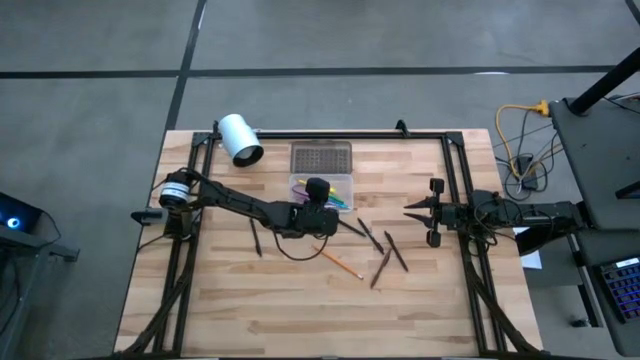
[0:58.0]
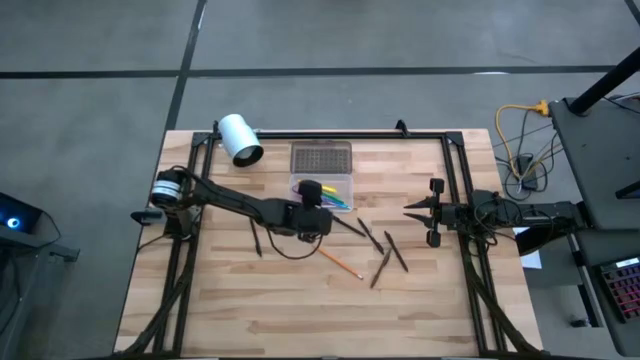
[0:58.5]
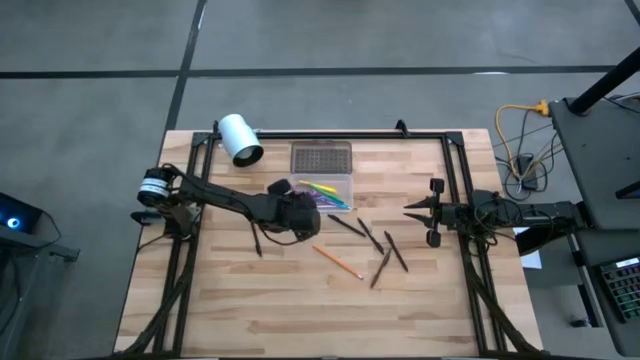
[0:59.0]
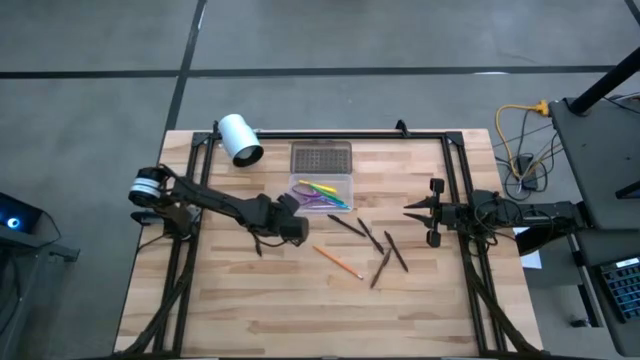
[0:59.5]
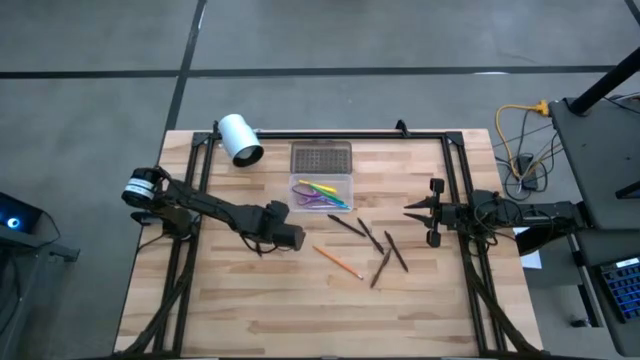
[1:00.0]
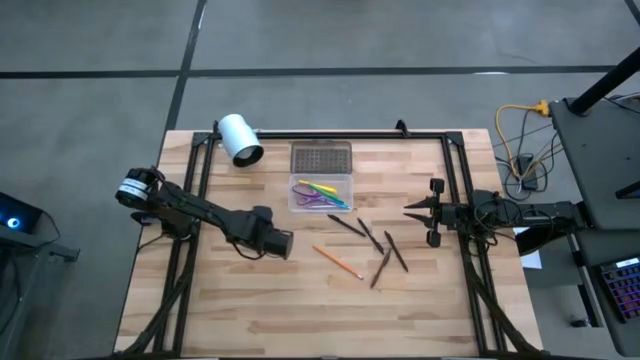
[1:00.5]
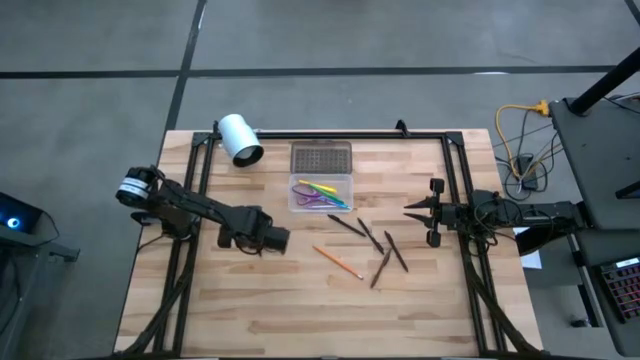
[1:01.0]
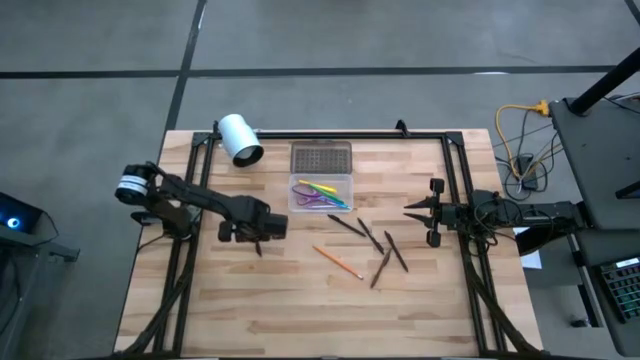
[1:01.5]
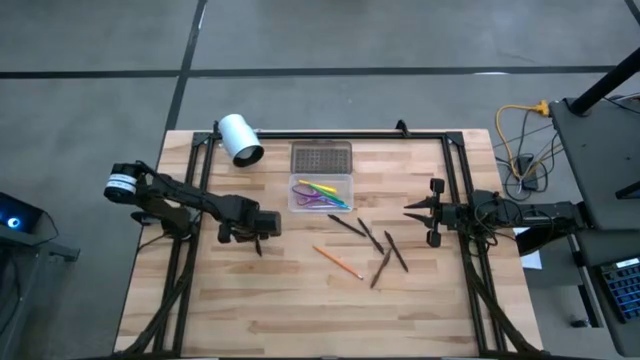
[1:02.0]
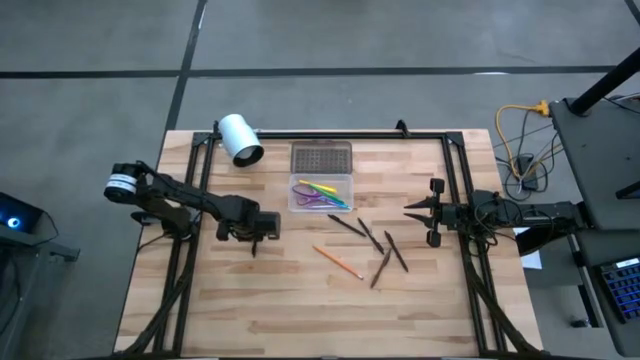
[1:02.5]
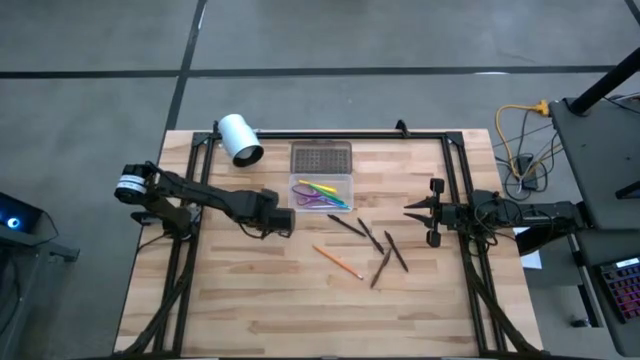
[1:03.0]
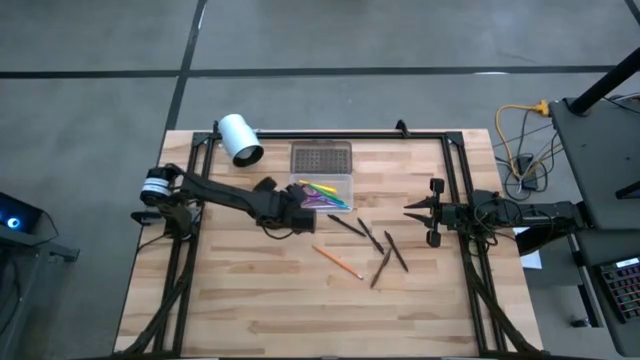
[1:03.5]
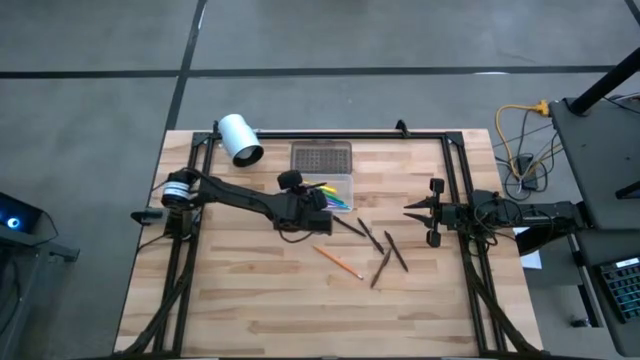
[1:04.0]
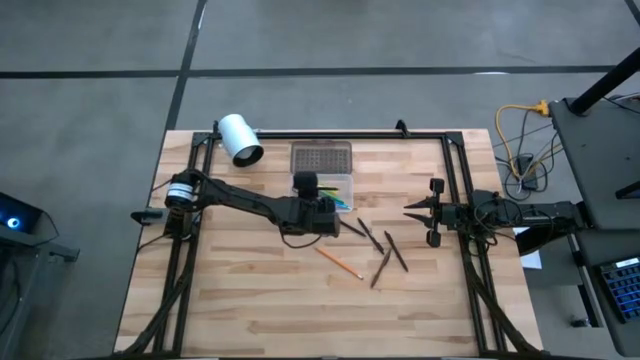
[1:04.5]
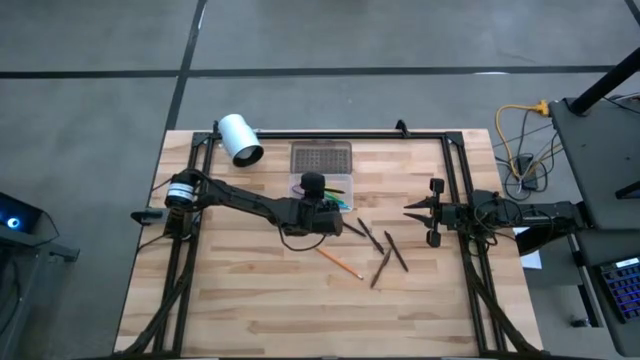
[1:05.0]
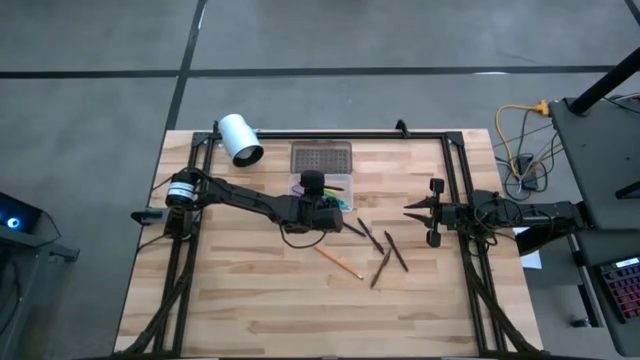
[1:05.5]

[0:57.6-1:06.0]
Task: Pick & place school supplies into a supply box
Put the black pen into the supply box

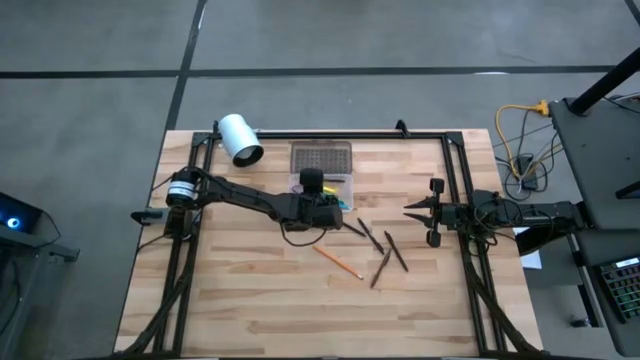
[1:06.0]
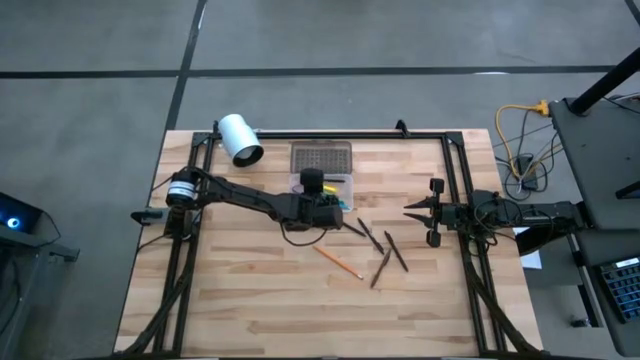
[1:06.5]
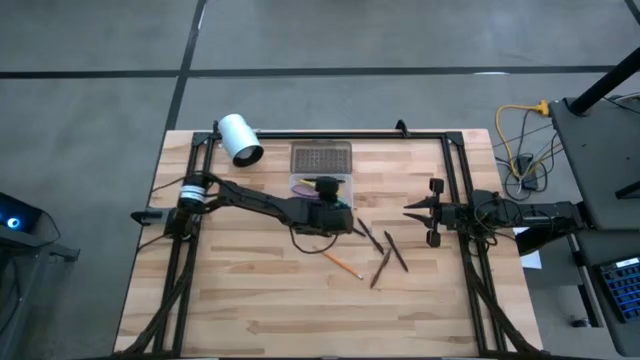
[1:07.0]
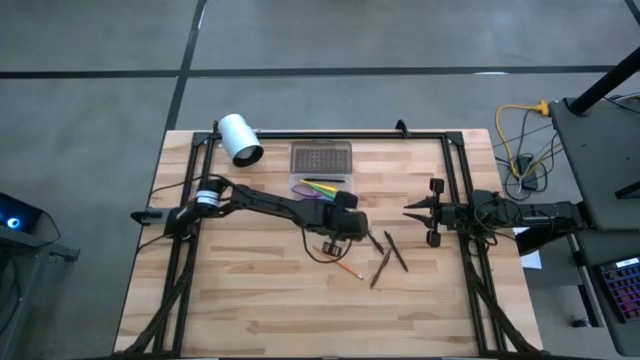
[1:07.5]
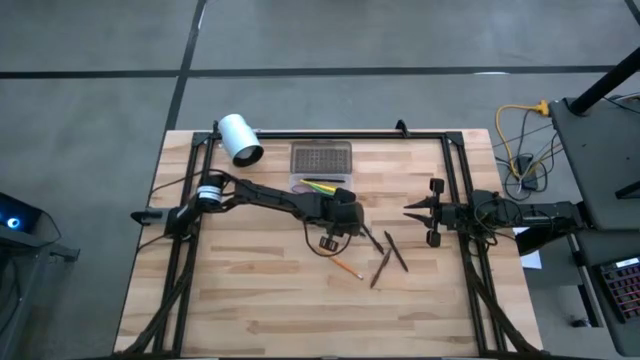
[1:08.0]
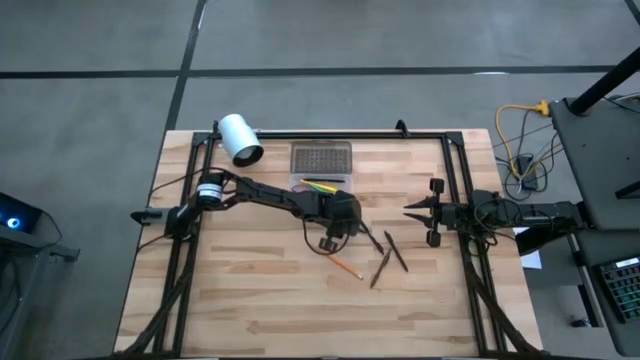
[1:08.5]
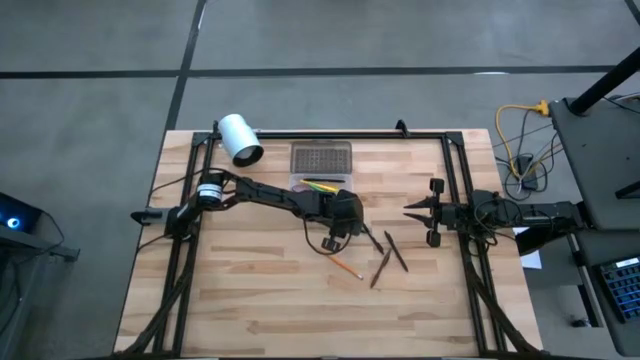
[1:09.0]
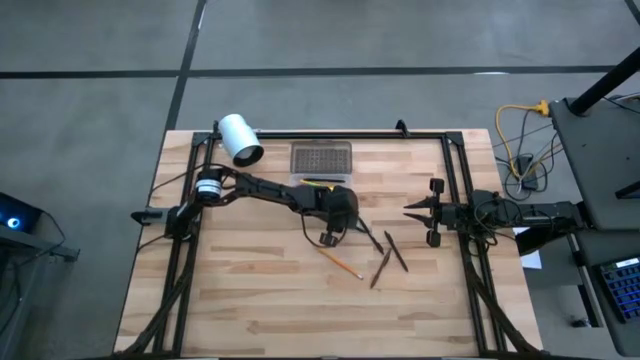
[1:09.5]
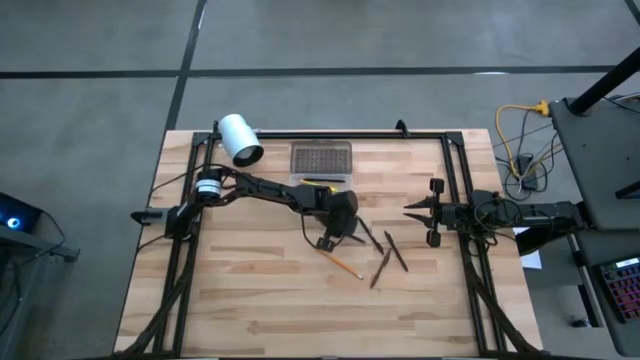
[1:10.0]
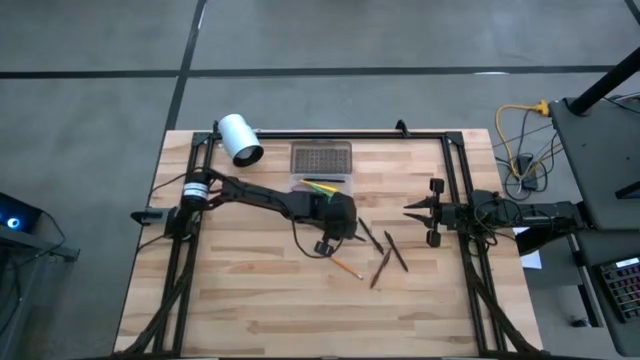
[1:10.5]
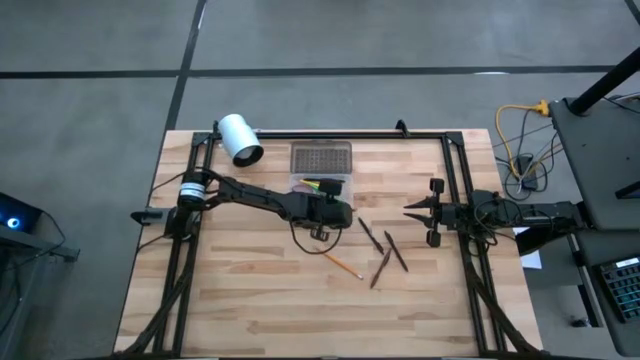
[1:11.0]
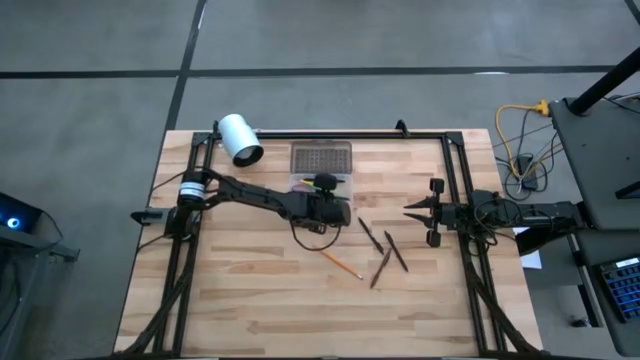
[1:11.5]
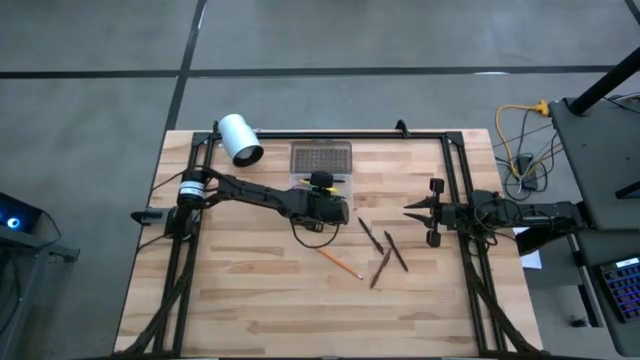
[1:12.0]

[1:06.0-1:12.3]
Put the black pen into the supply box

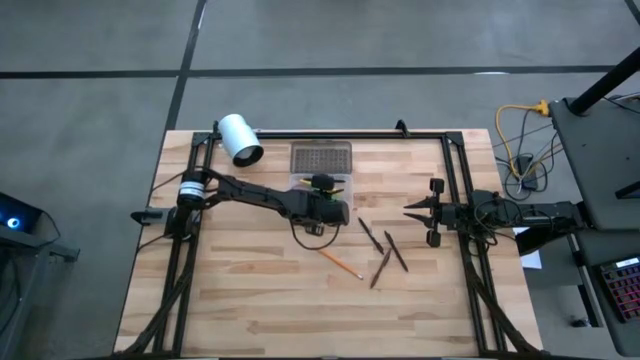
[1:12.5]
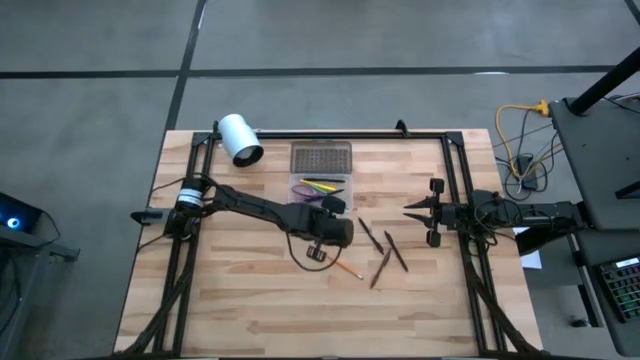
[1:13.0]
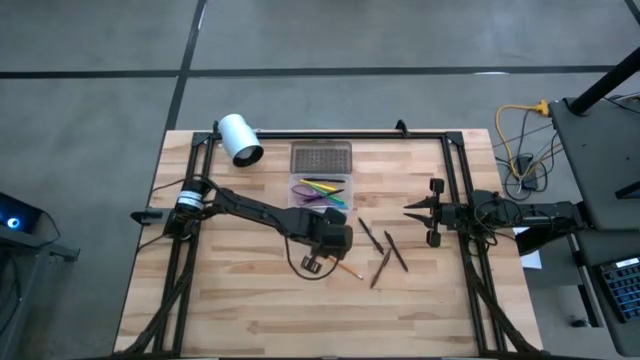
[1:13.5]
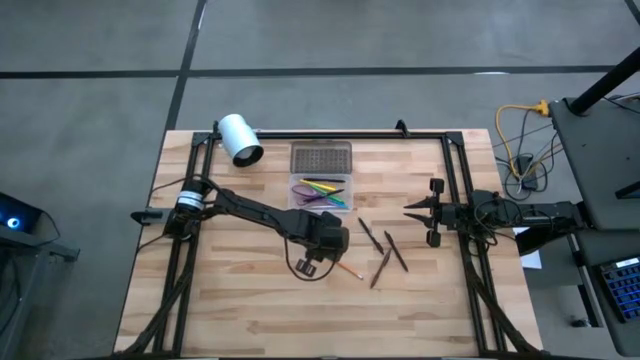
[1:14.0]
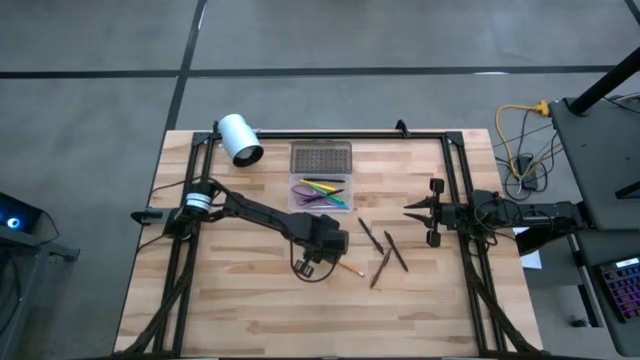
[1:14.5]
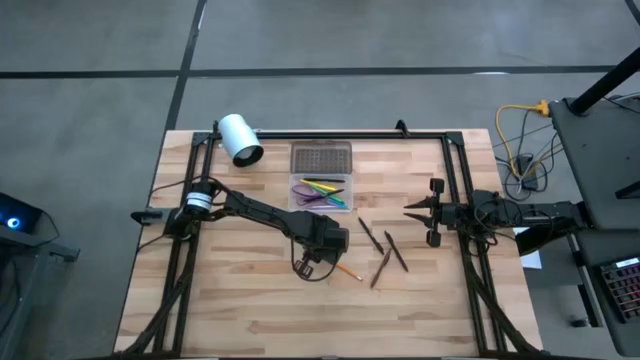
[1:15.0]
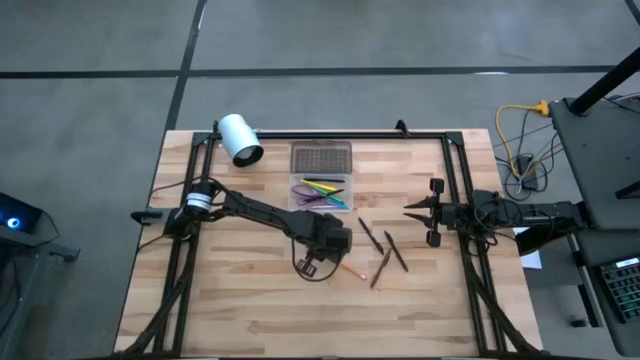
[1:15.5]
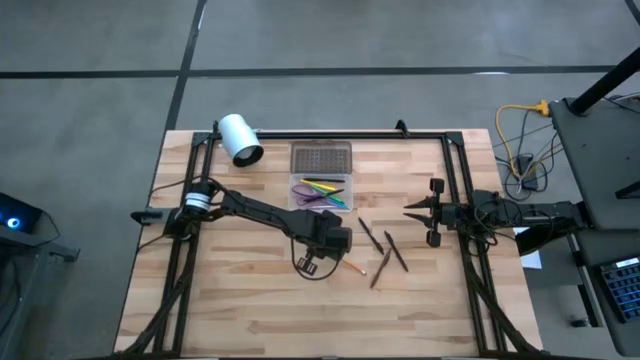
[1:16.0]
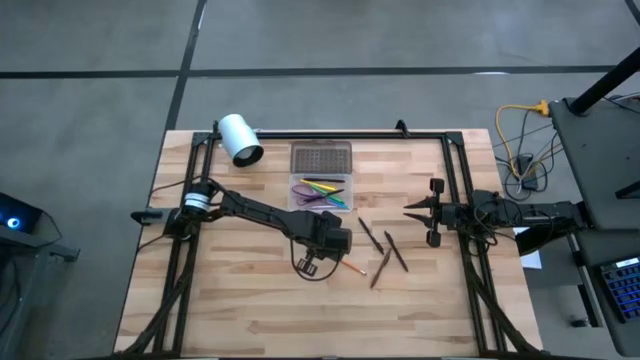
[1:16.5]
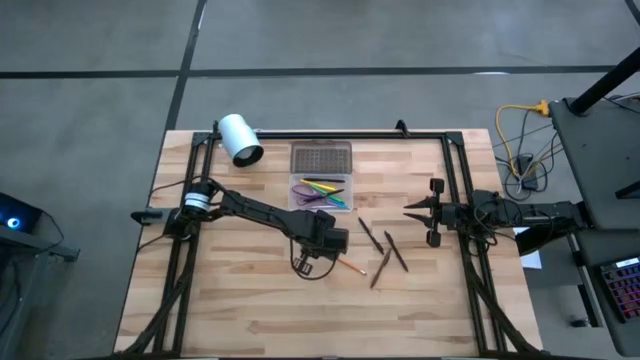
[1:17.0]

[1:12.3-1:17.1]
Put the orange pencil into the supply box

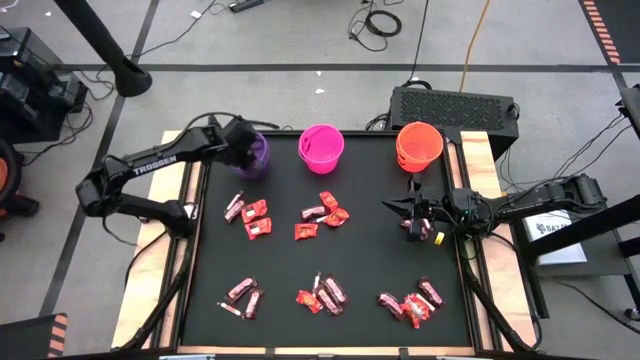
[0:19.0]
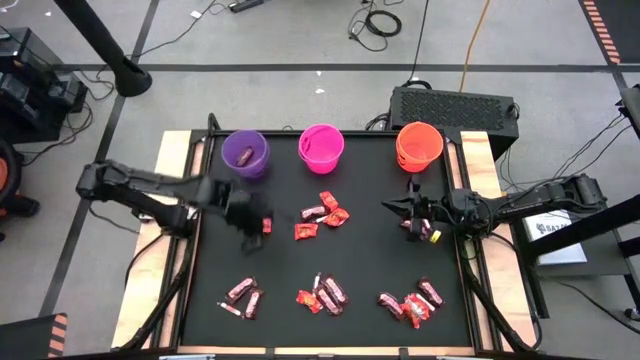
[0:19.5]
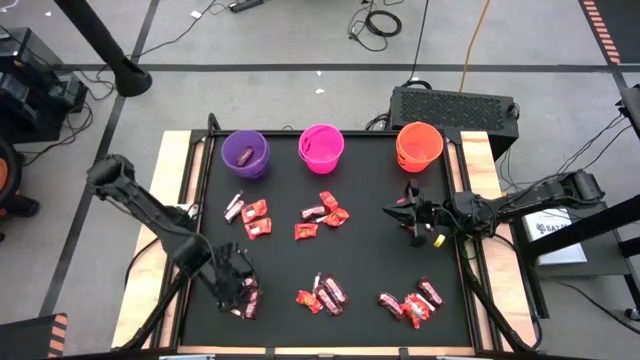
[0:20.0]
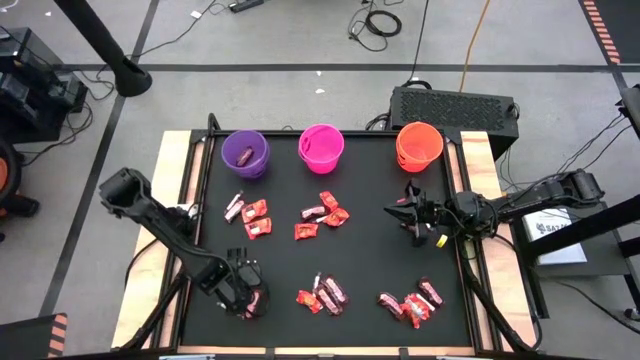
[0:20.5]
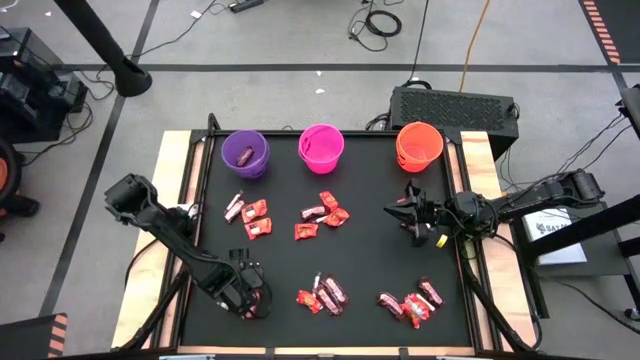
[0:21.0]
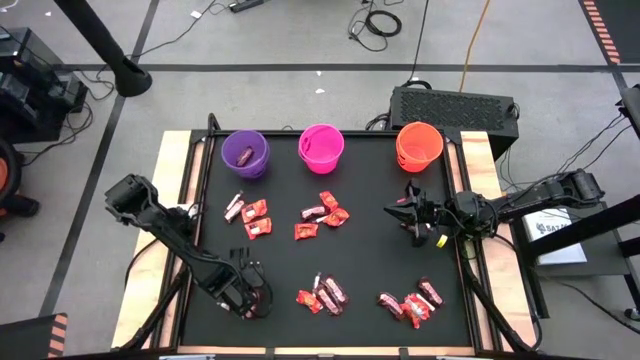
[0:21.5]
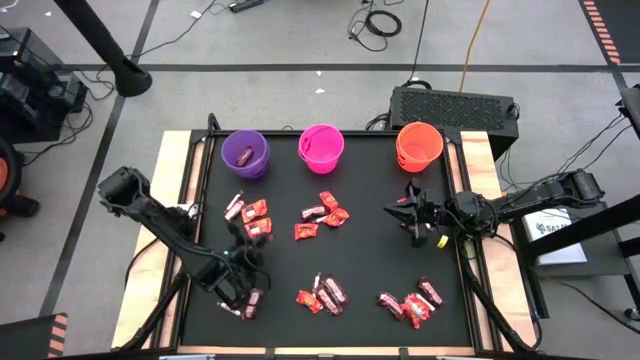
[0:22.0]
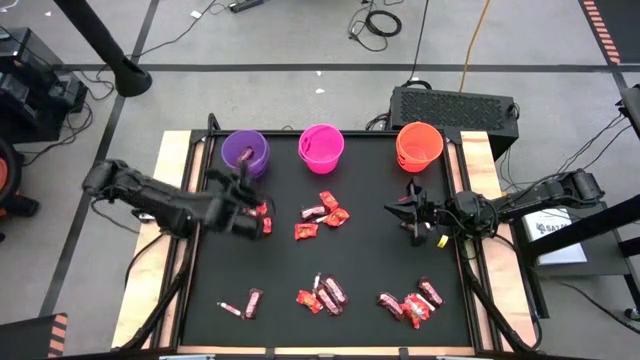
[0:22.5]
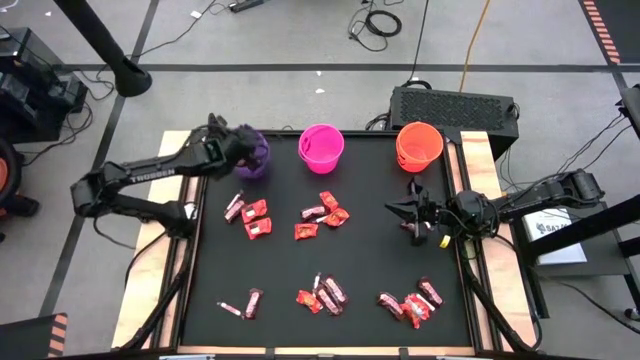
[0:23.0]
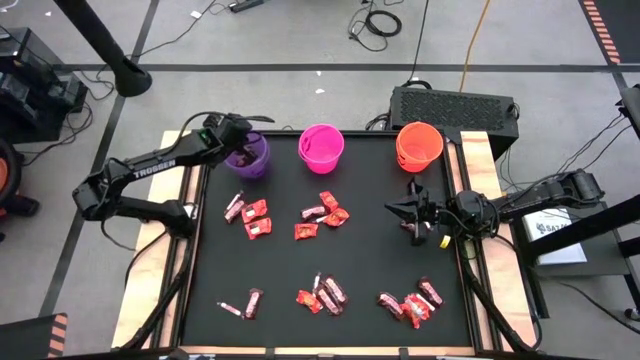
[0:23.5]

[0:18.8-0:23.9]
Task: Sort candy by brand, put in halloween buckets
Put the brown chocolate bar into the purple bucket
